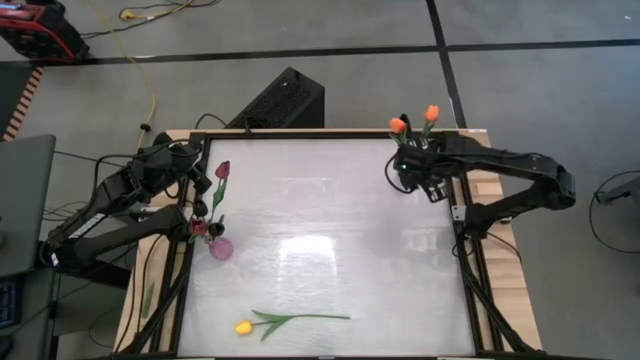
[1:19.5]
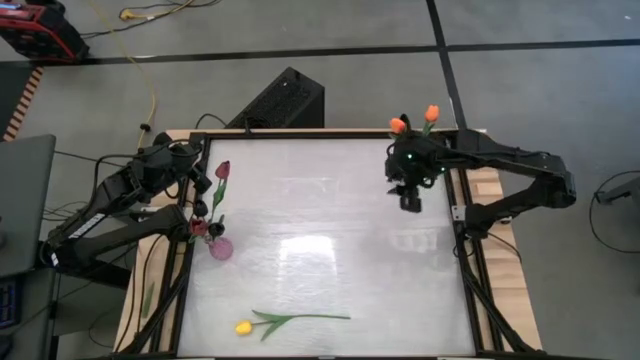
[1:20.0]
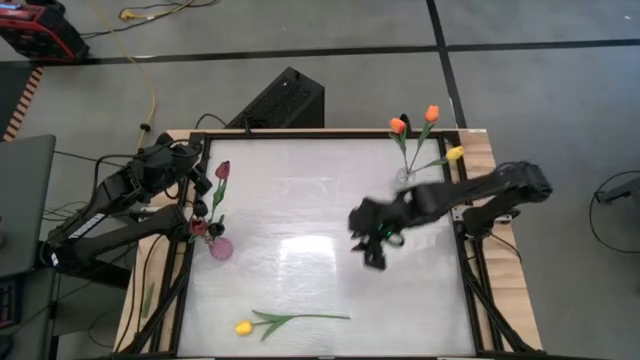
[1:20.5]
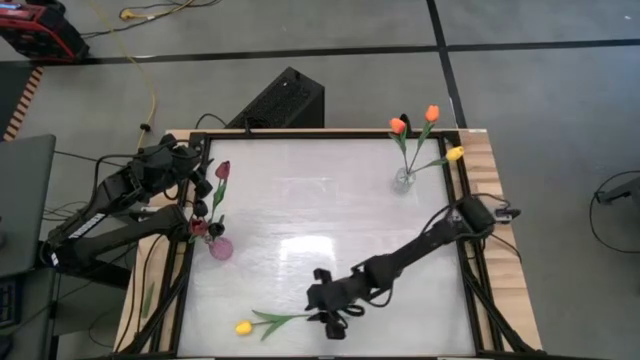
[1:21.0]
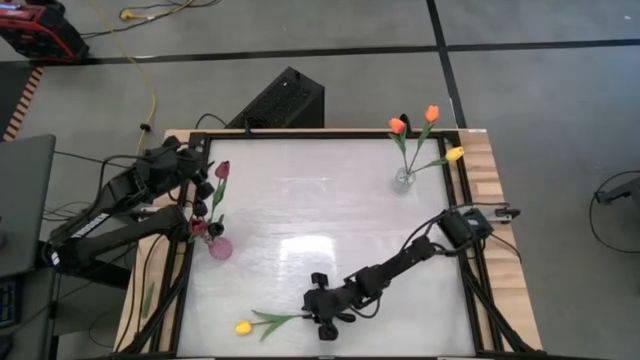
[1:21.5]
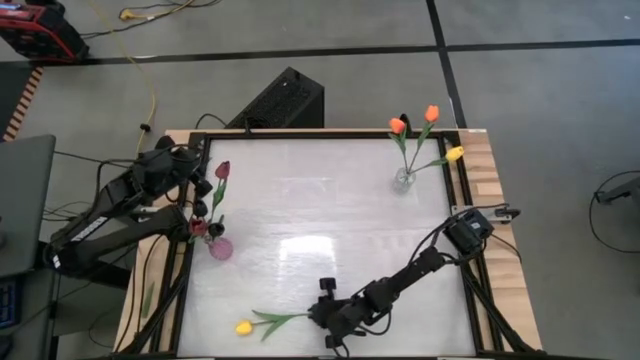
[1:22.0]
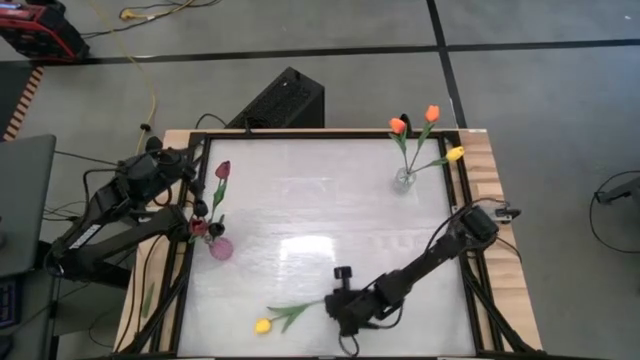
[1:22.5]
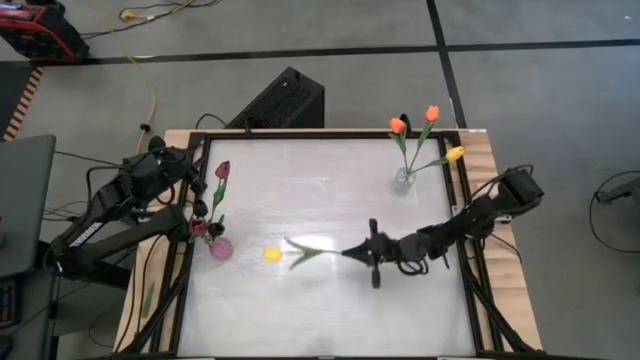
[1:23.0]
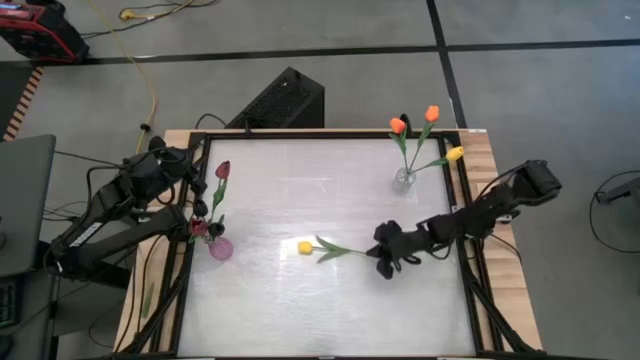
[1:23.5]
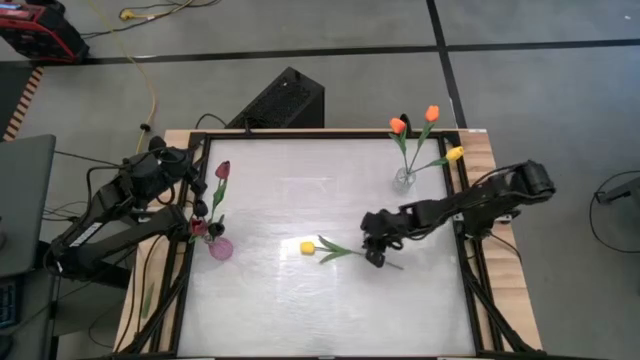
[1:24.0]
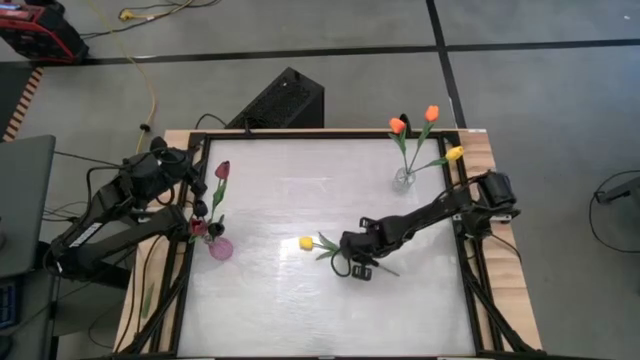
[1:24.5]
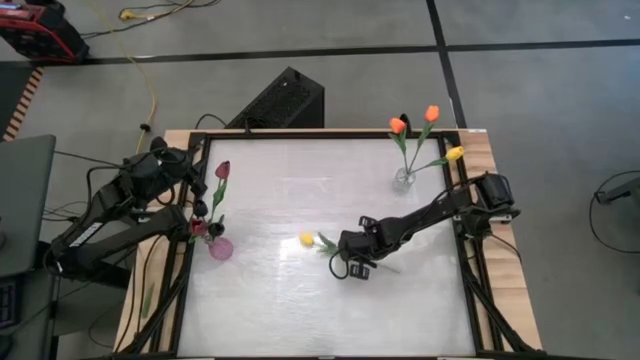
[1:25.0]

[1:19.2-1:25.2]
Task: Sort flowers into vase by color
Put the yellow tulip into the transparent vase

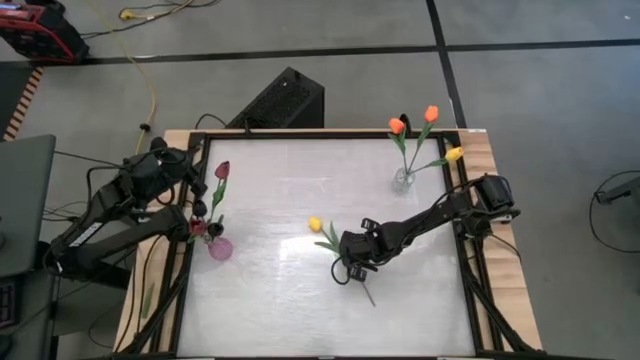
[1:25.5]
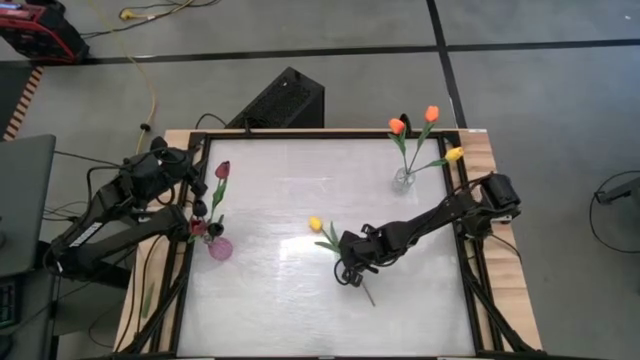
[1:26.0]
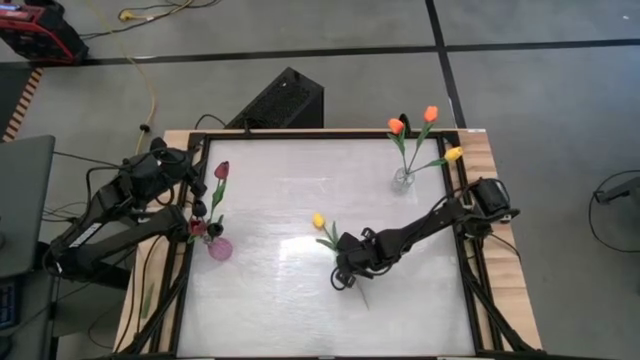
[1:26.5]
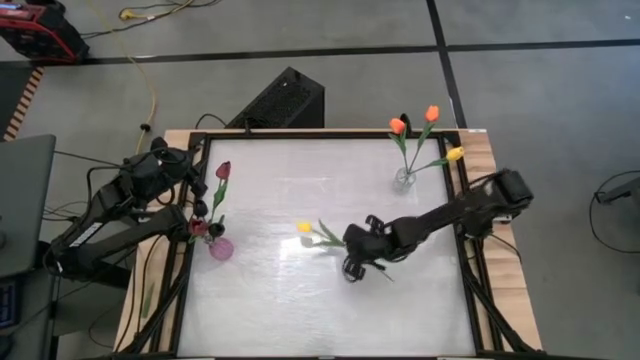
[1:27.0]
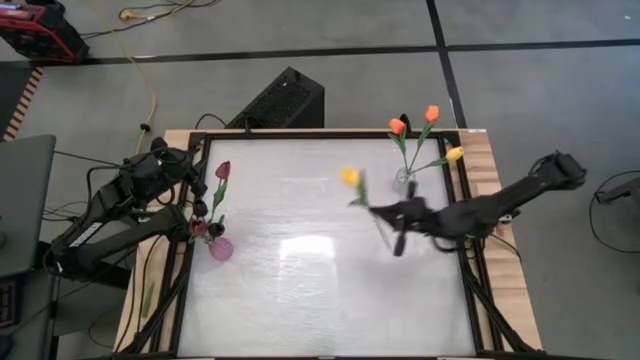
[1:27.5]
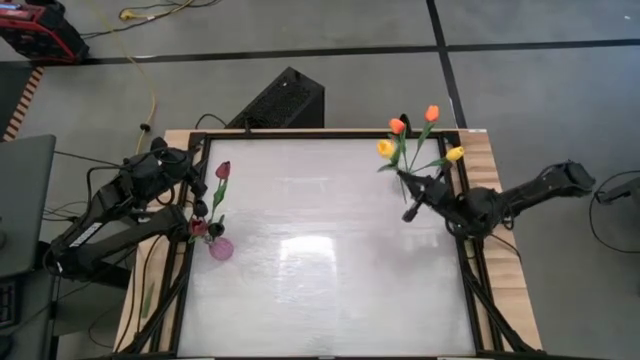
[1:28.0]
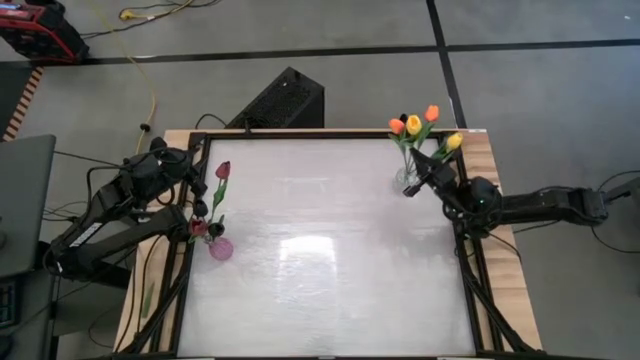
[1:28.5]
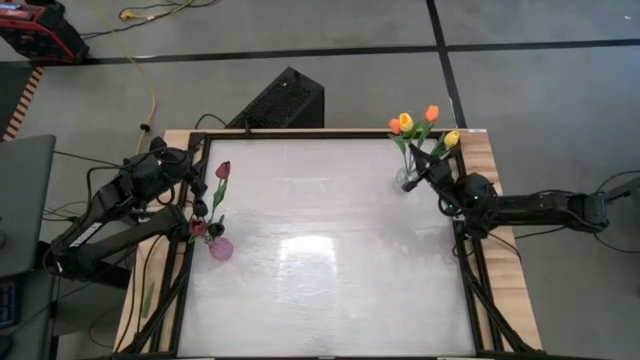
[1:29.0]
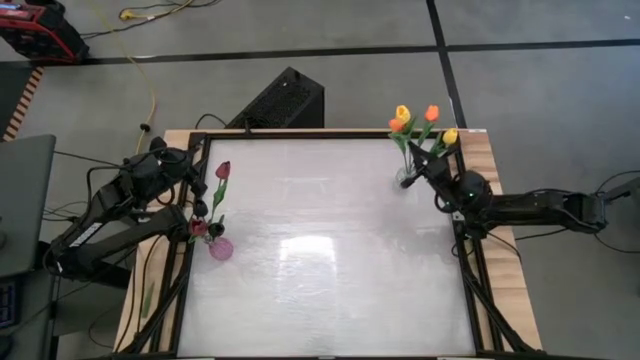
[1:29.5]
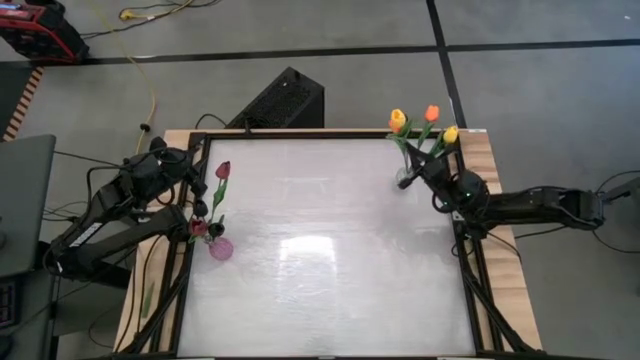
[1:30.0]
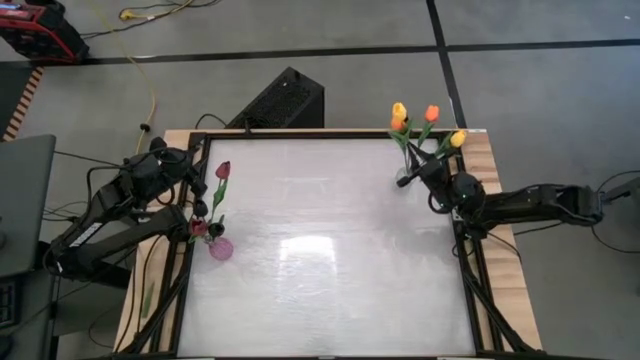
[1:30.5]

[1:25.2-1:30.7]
Put the yellow tulip into the transparent vase

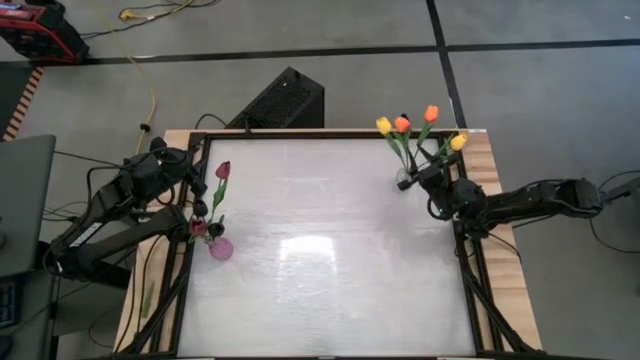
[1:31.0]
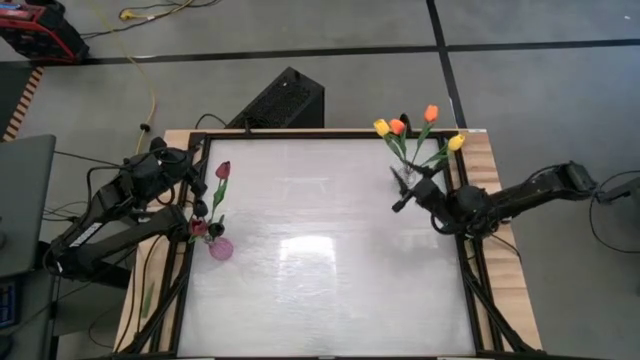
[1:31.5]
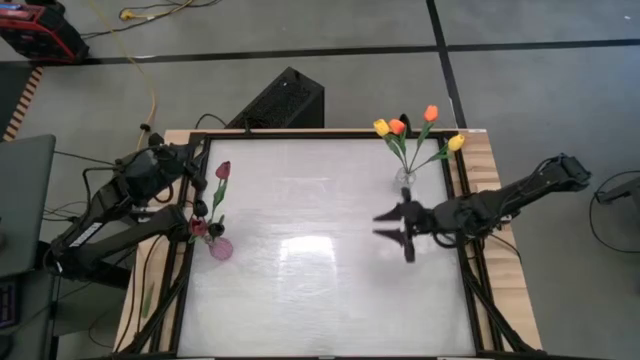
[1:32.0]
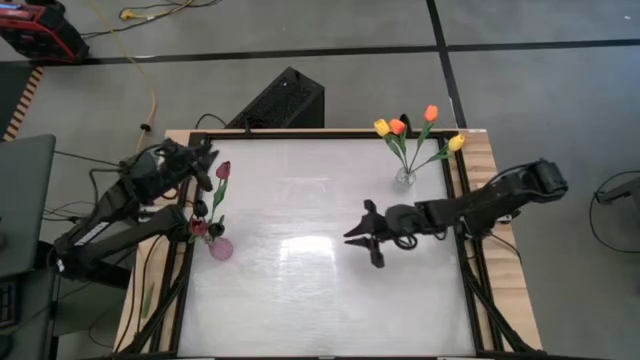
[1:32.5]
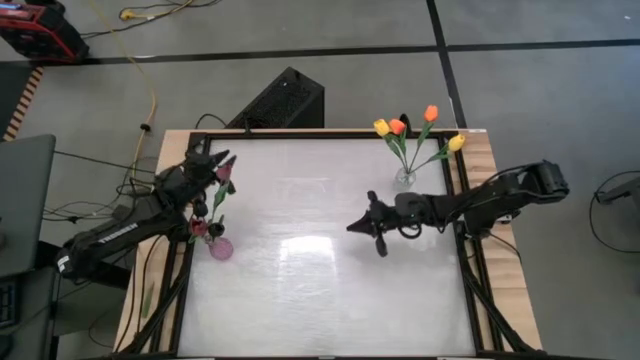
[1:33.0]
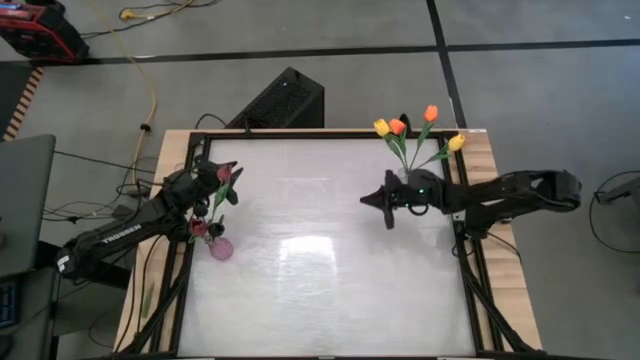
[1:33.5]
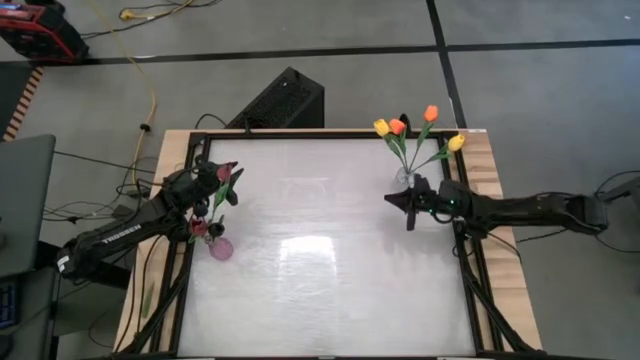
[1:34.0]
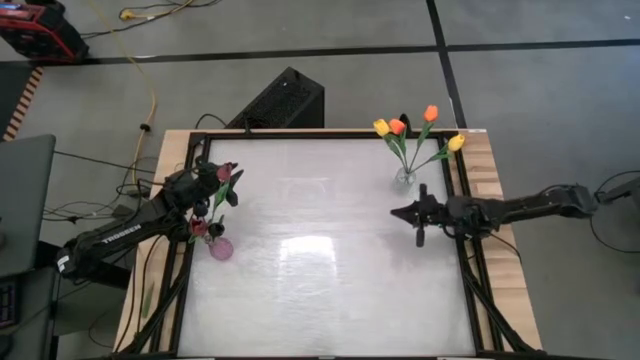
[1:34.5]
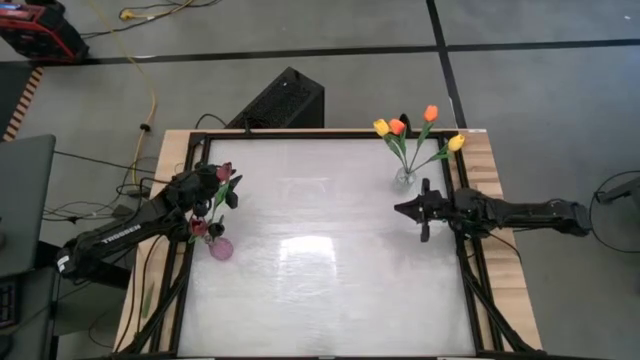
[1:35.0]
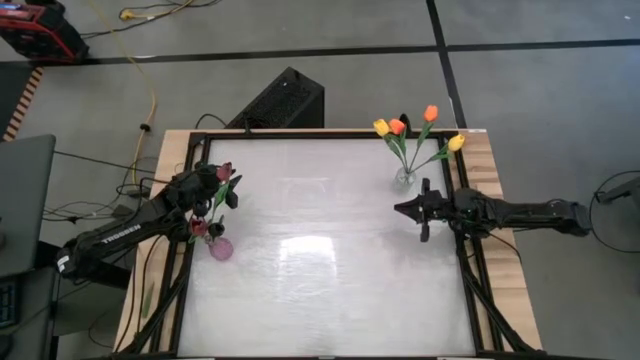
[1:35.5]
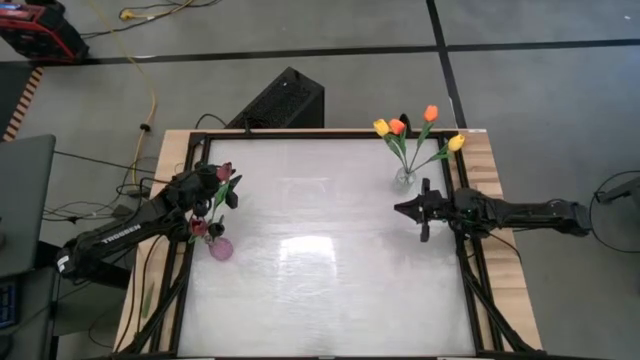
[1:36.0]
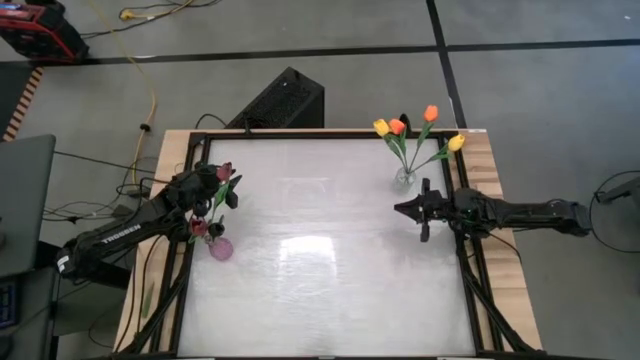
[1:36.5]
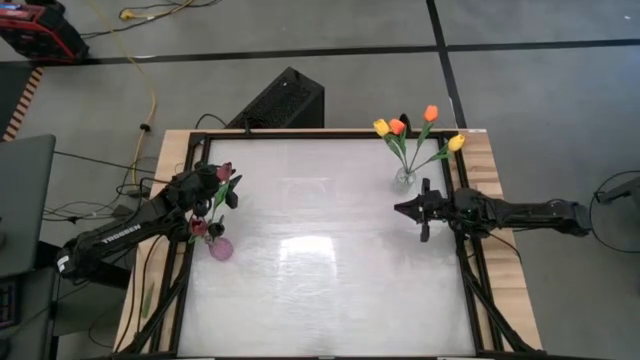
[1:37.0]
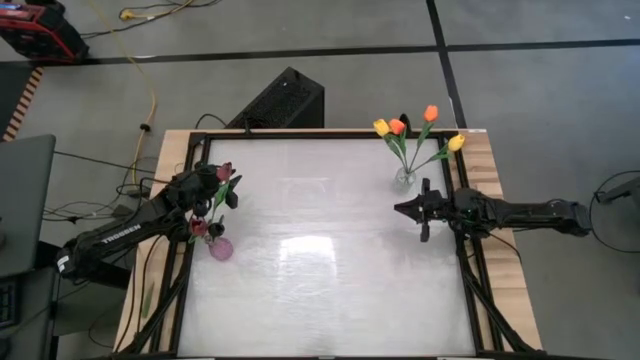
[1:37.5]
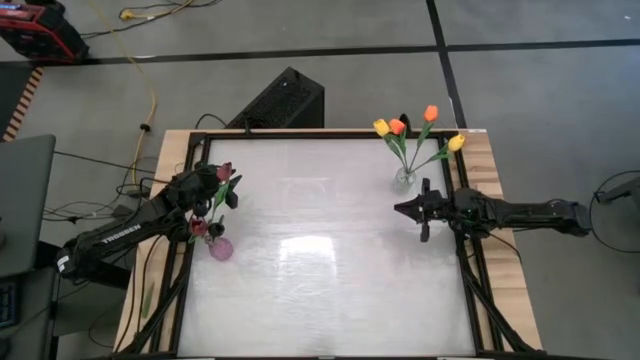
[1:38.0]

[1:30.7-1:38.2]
Return to Home Position

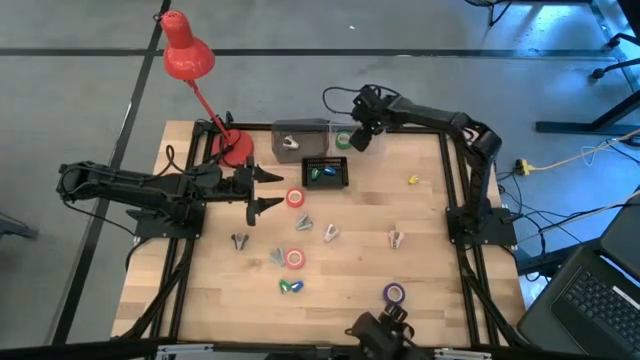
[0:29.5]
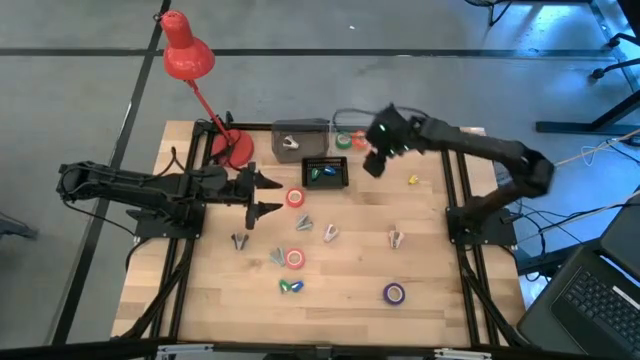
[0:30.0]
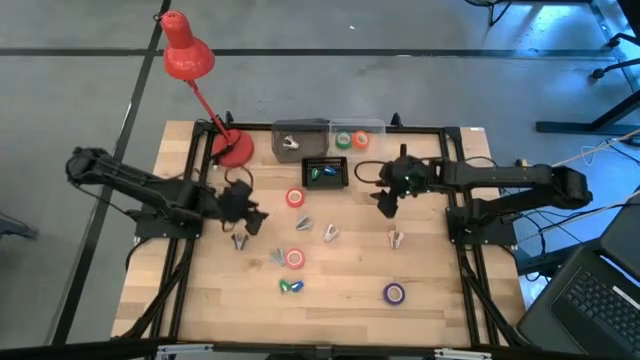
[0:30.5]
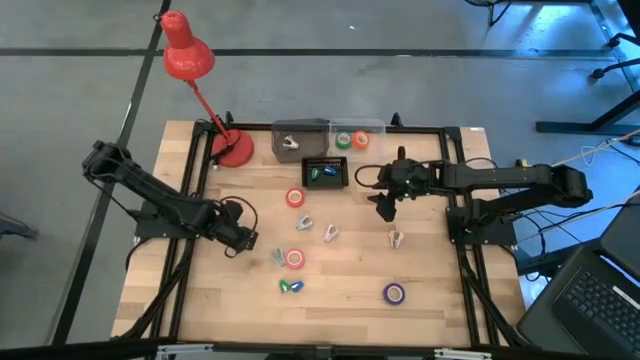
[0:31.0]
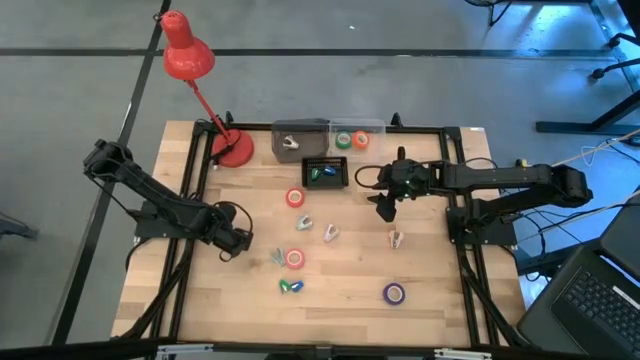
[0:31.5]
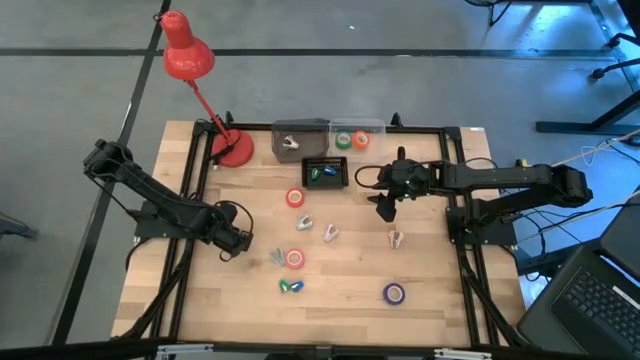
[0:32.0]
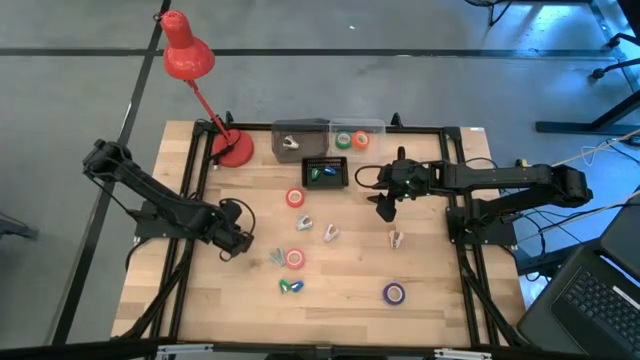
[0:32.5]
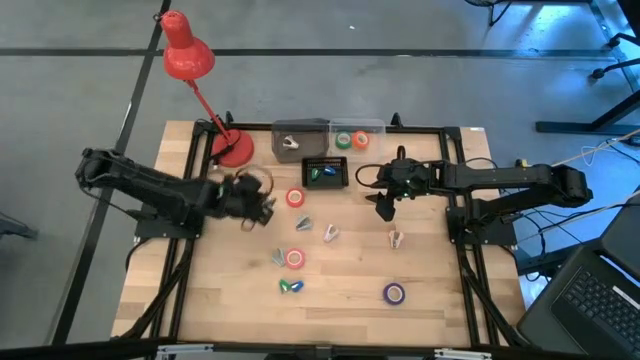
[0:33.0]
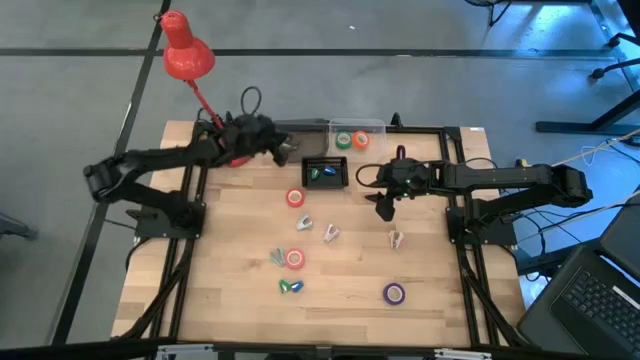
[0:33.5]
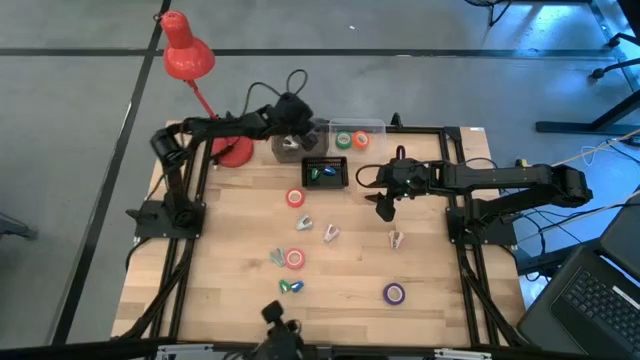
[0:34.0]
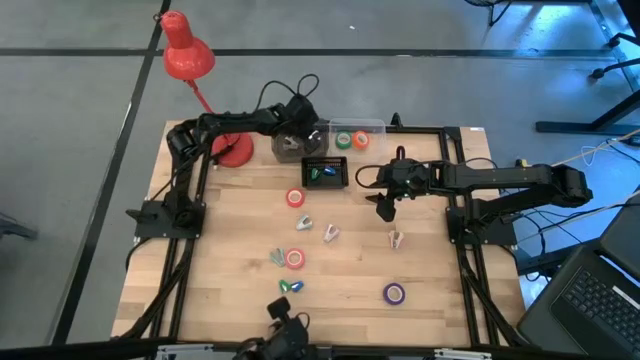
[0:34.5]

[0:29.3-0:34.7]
Task: Pick and place Stapler, Stapler remover, tape
Put the gray staple remover into the gray bin
